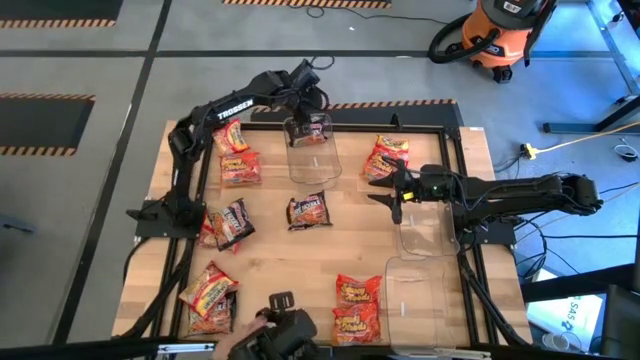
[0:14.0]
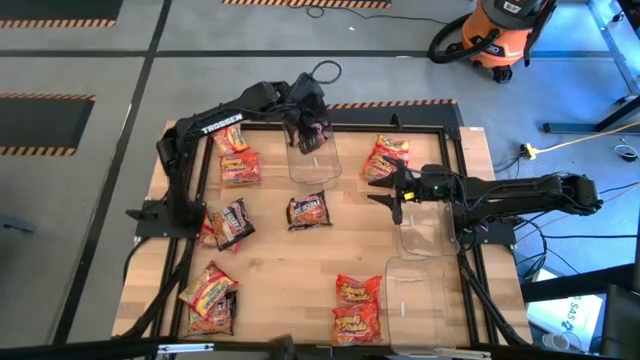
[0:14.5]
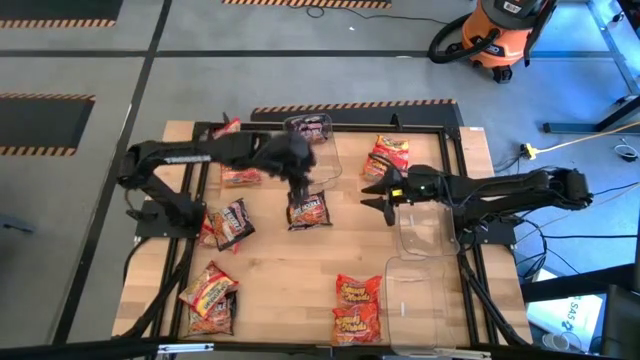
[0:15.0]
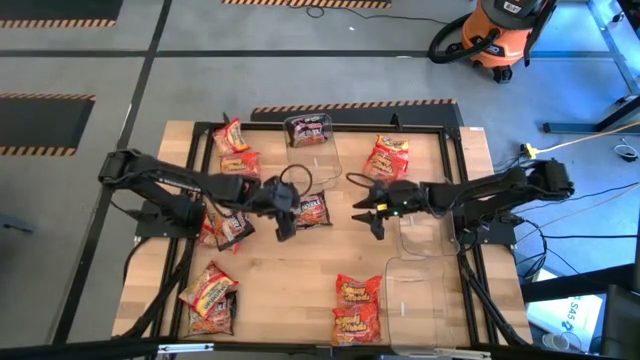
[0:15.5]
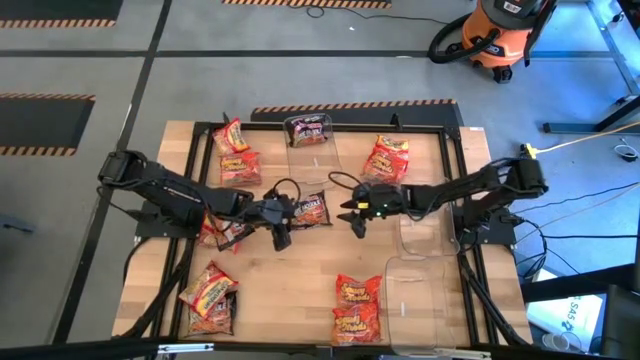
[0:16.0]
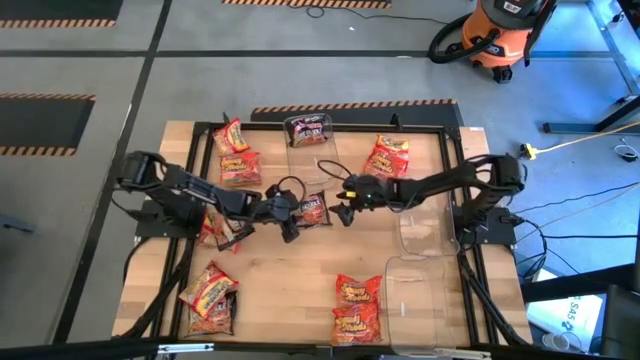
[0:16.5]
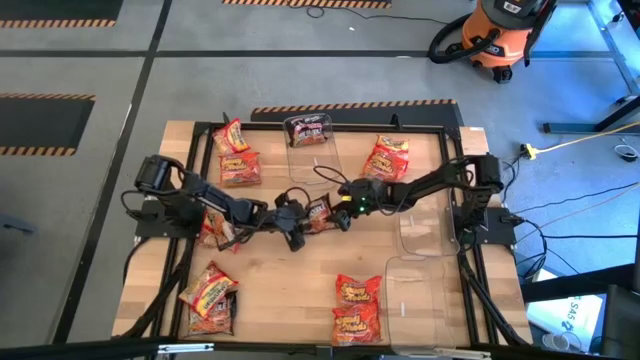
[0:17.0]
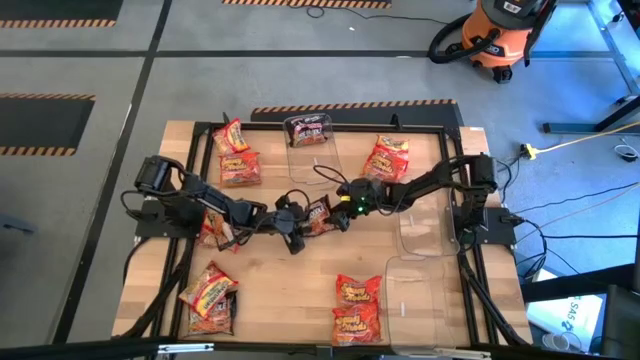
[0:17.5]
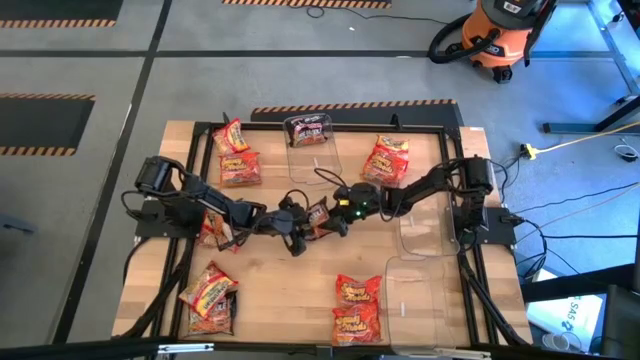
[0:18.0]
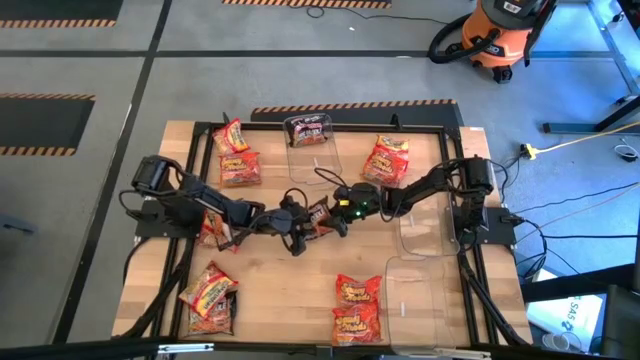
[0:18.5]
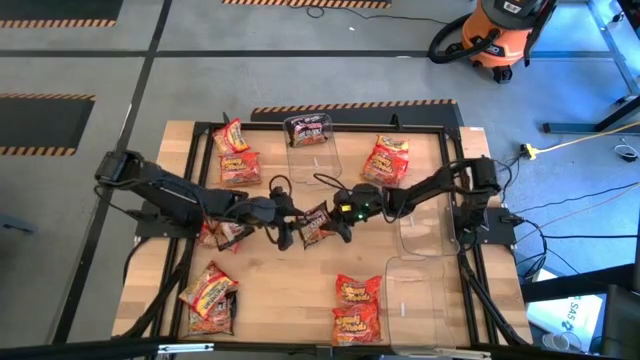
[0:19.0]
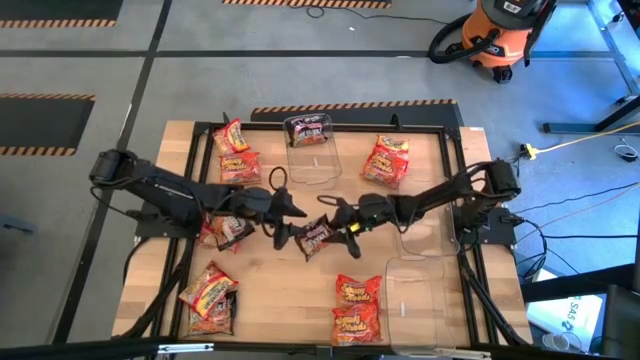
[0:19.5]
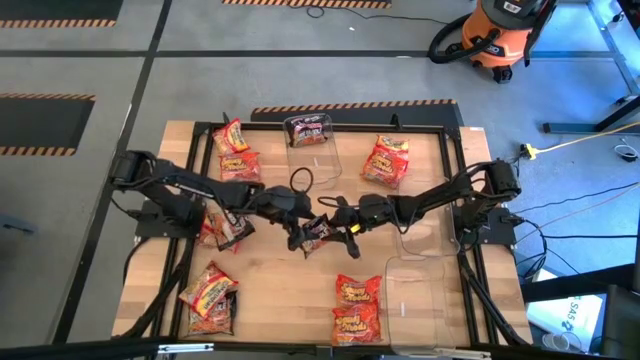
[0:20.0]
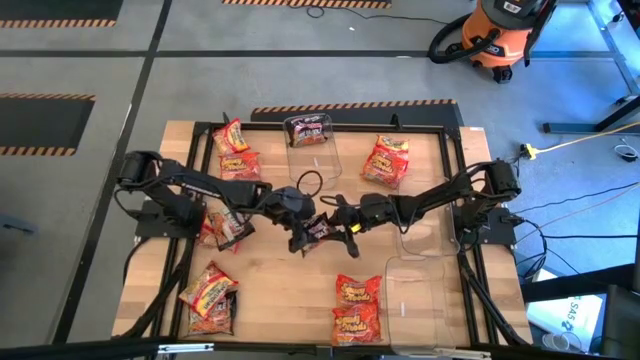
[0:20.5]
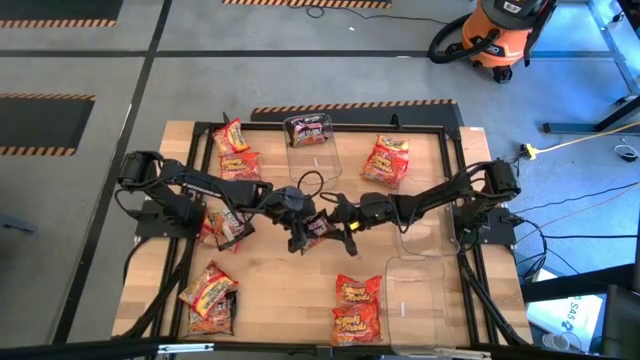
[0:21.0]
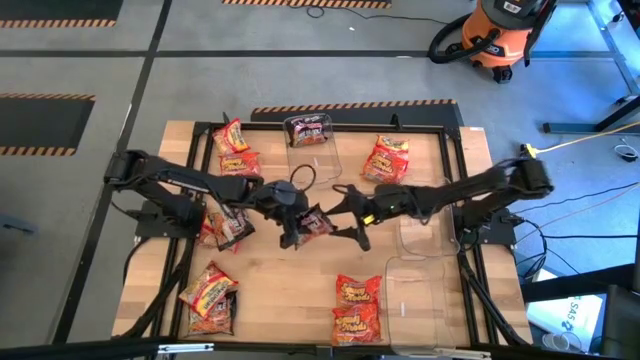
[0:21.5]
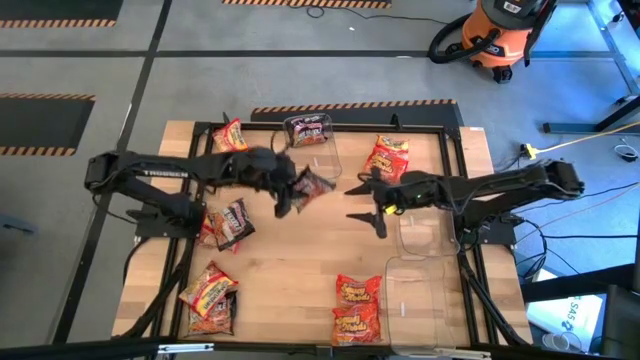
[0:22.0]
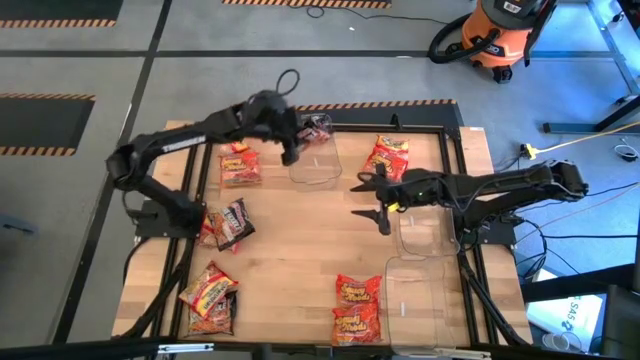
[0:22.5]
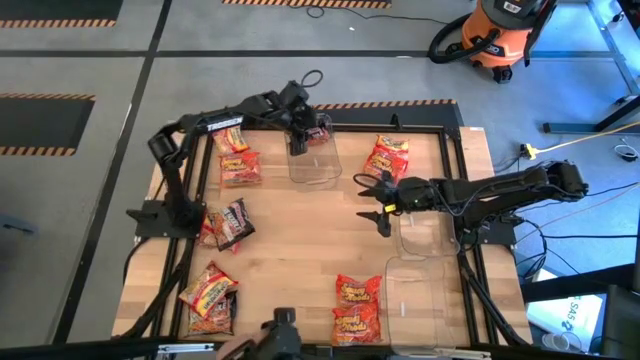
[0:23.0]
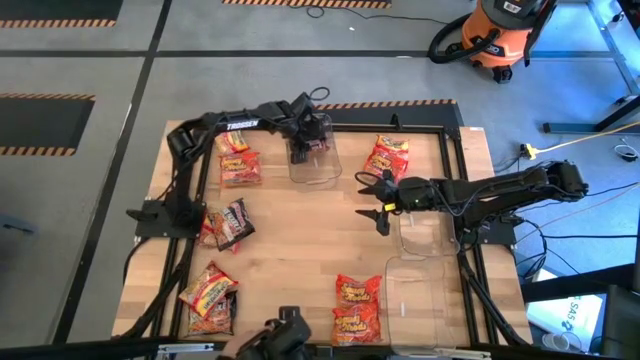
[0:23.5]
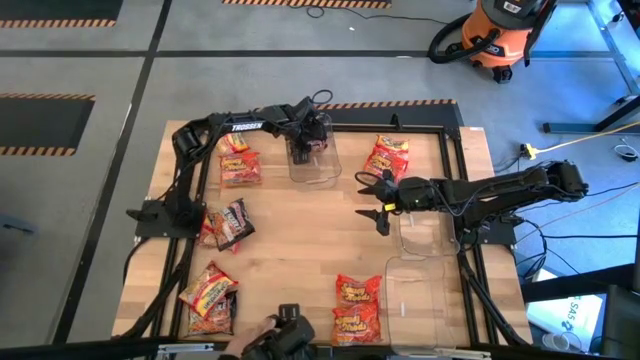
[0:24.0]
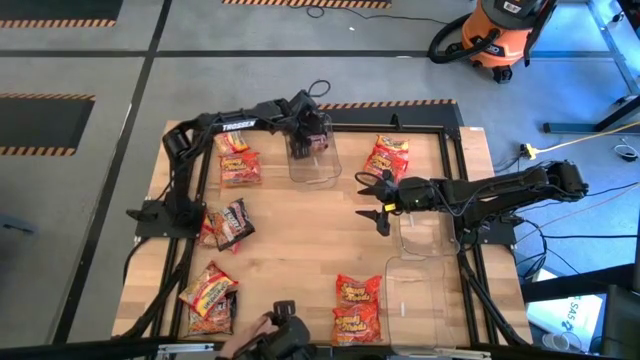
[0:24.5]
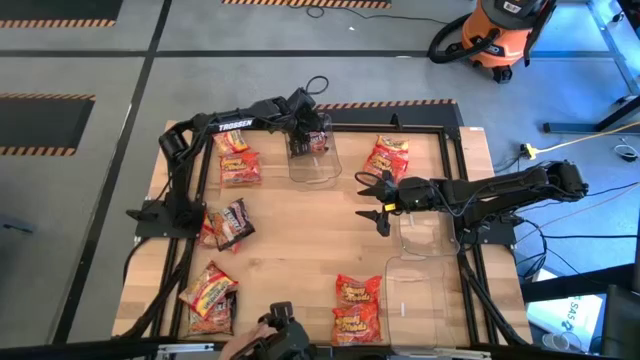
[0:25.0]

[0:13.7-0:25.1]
Task: Sort Maruchan noodles
Put the black noodle pack into the top transparent bin

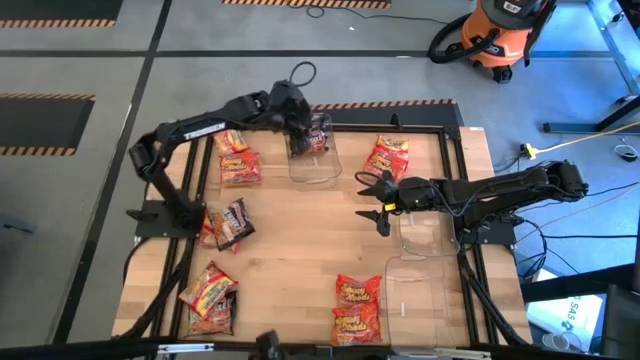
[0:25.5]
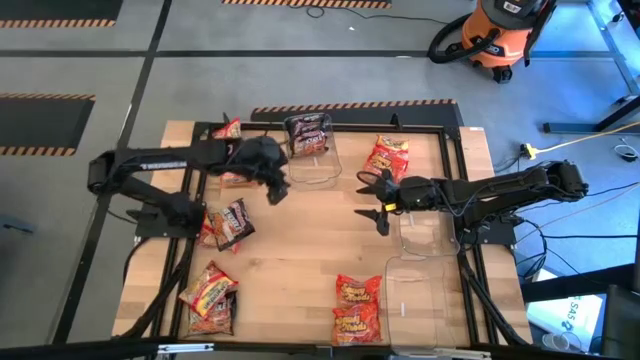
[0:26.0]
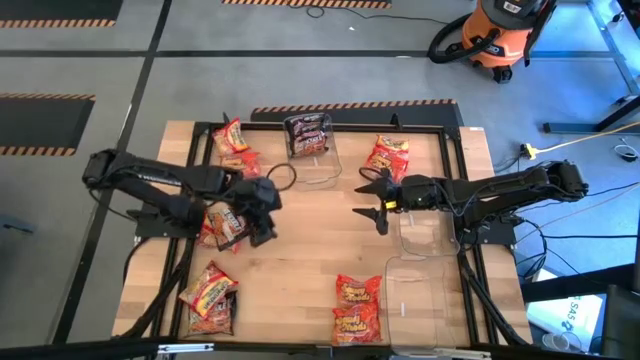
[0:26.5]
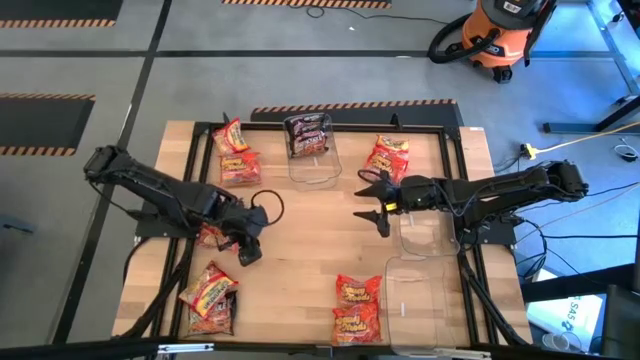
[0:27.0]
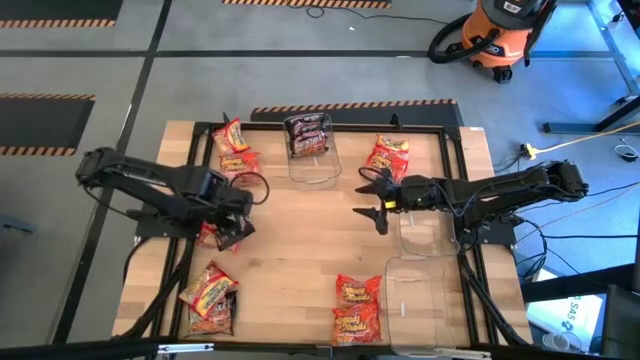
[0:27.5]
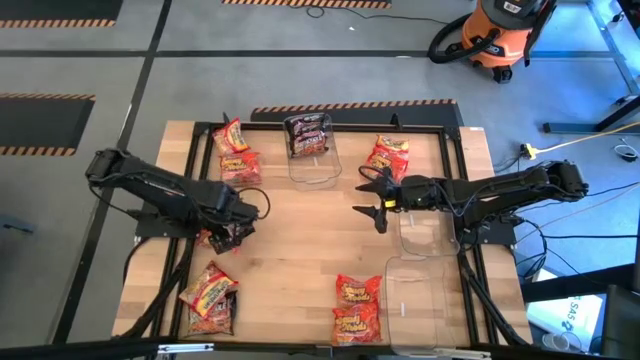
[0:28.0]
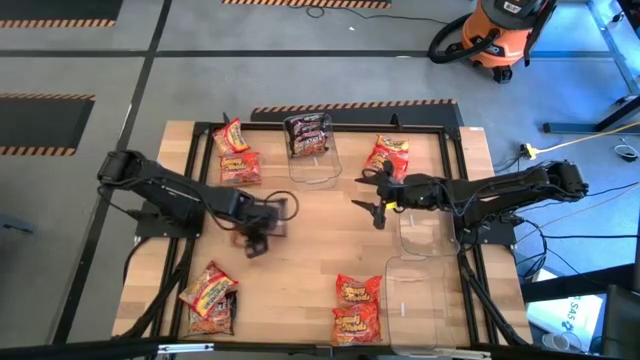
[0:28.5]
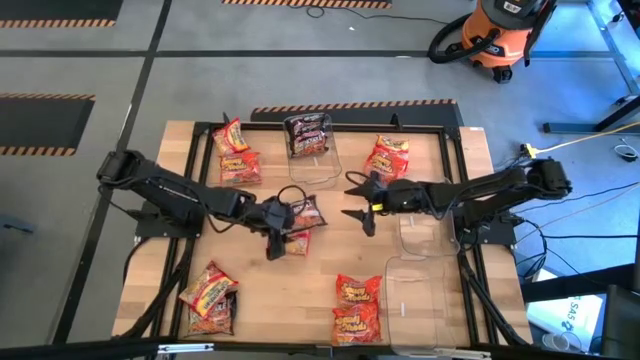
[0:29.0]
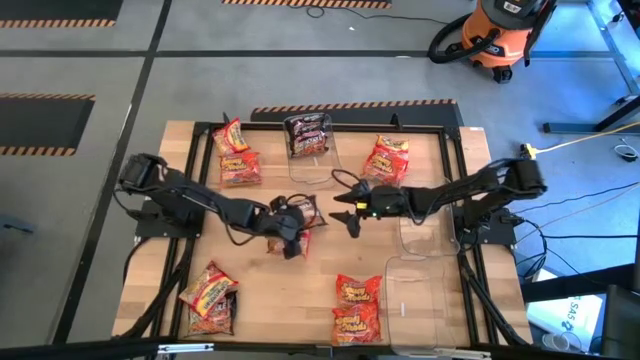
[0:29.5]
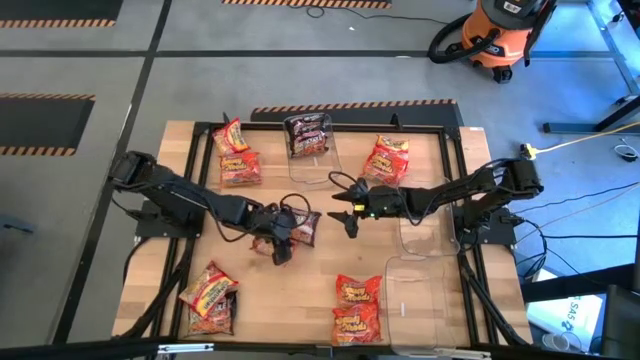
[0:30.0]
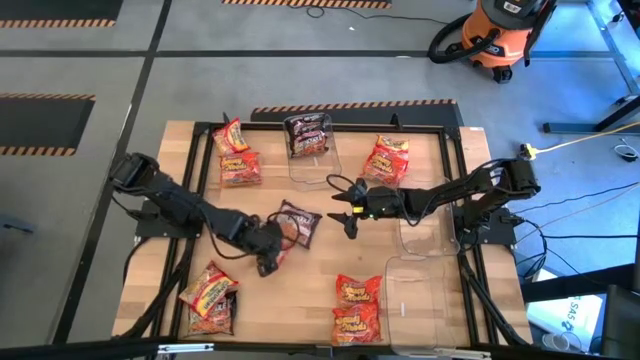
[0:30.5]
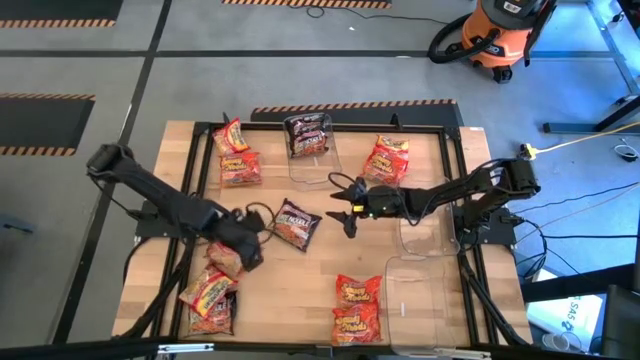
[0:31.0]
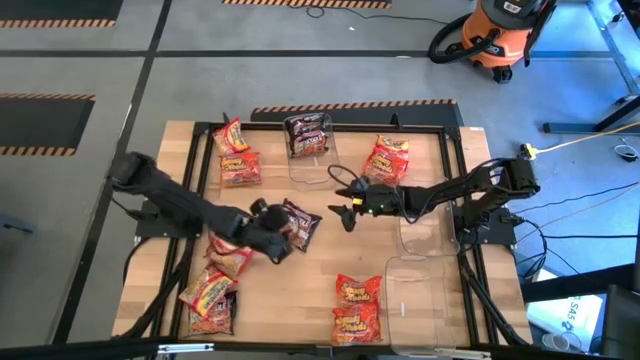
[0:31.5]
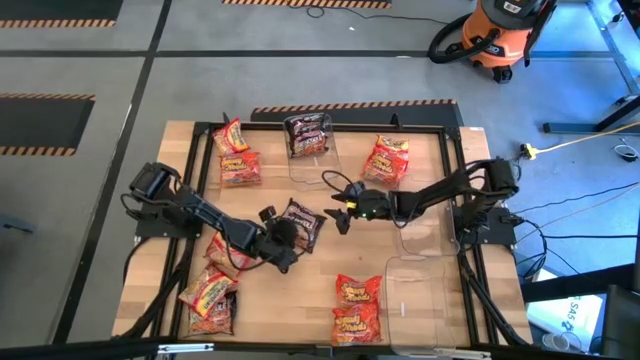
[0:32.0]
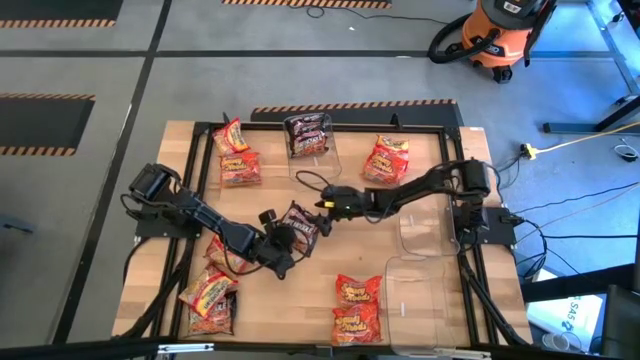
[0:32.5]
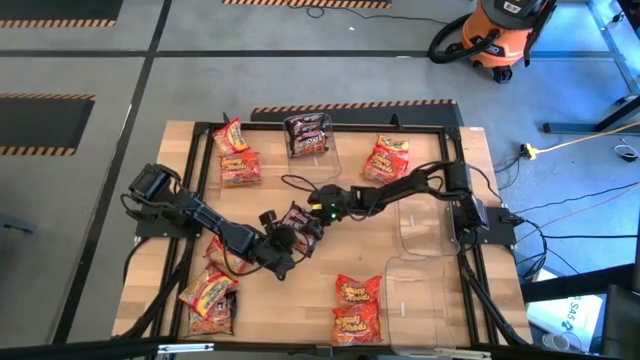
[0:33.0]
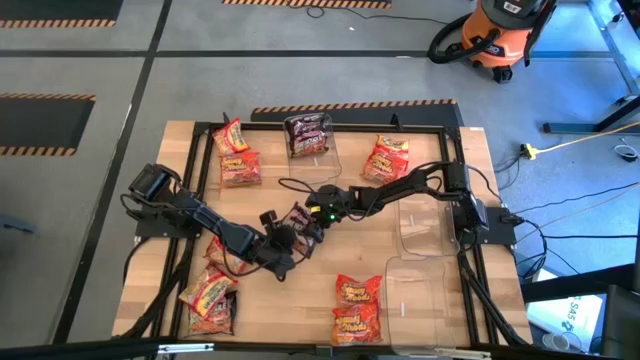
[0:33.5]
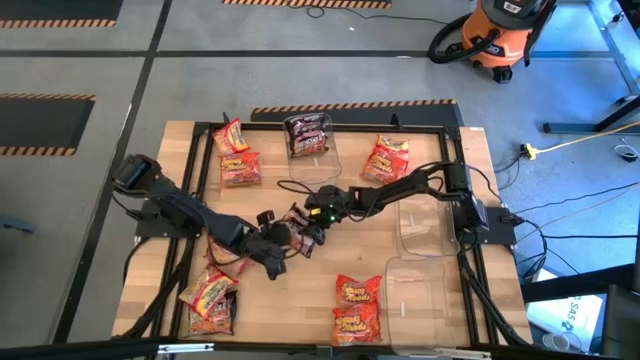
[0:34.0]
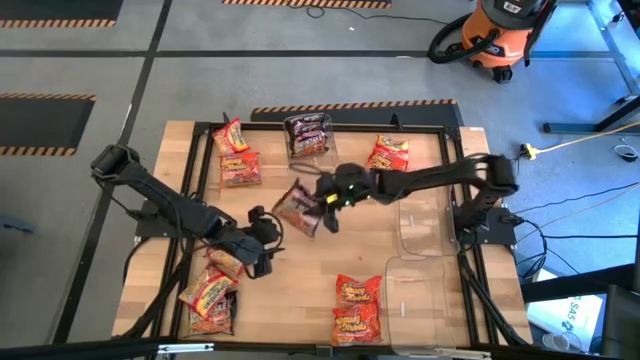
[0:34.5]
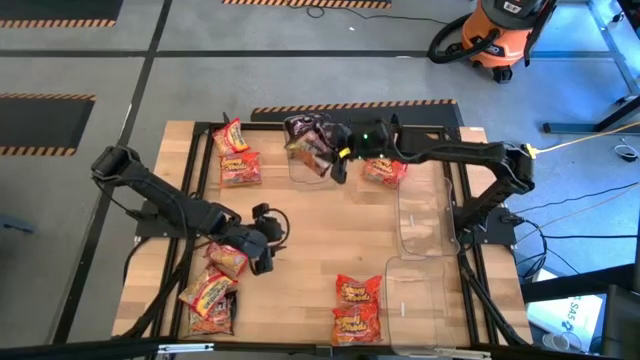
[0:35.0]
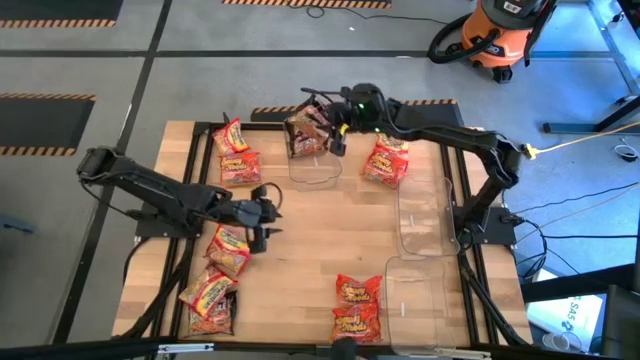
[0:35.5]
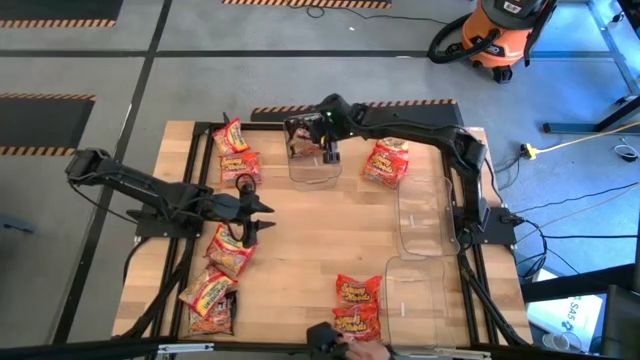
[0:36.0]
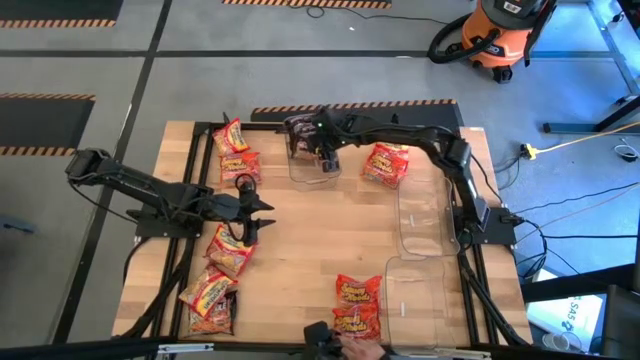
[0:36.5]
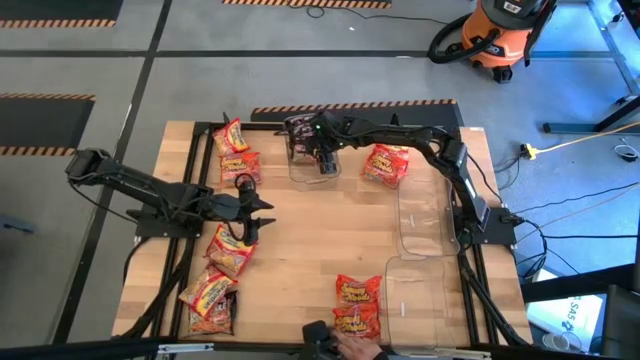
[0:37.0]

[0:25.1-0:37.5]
Put the black noodle pack into the top transparent bin
